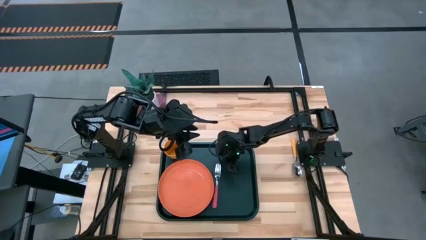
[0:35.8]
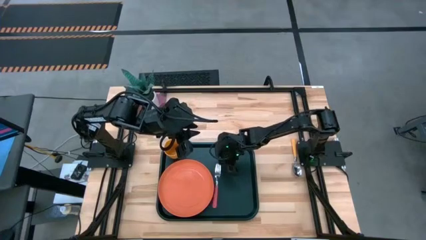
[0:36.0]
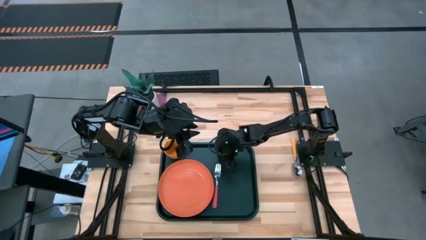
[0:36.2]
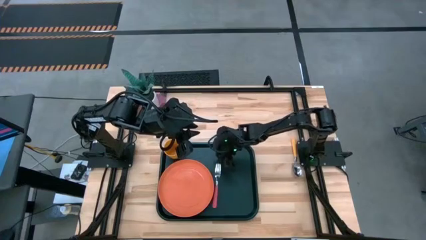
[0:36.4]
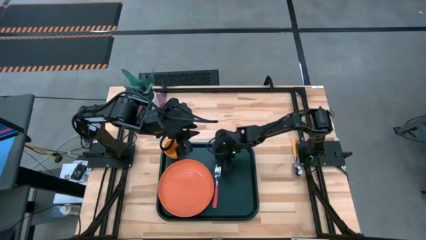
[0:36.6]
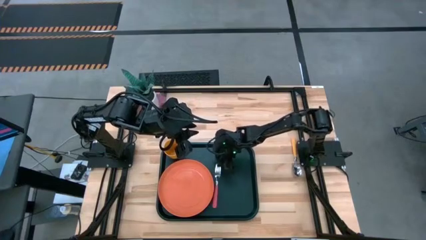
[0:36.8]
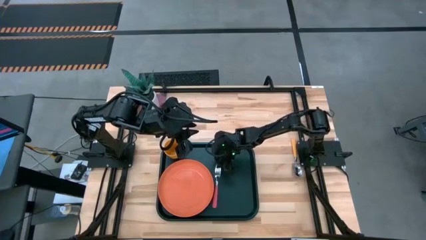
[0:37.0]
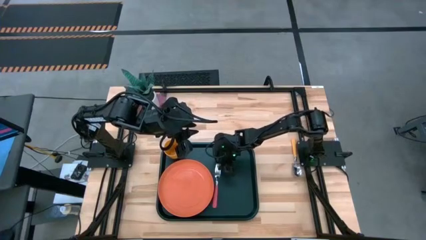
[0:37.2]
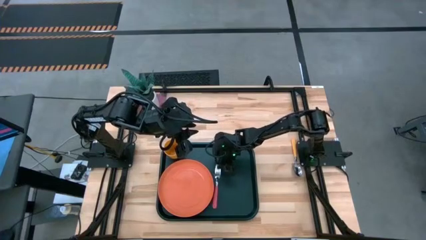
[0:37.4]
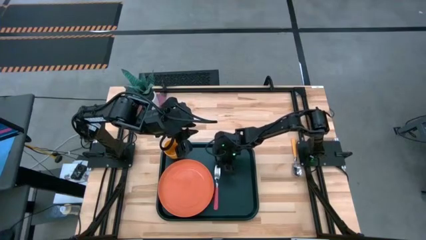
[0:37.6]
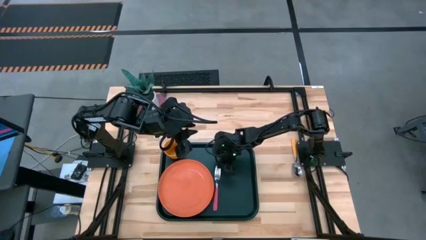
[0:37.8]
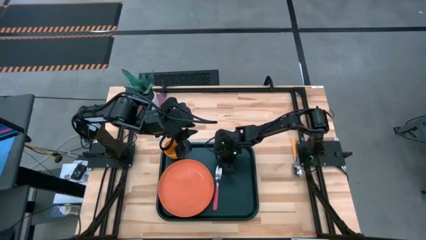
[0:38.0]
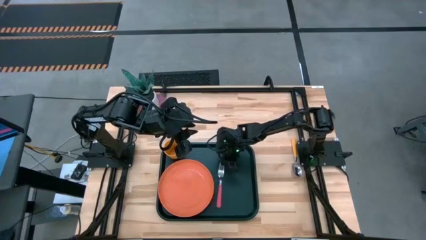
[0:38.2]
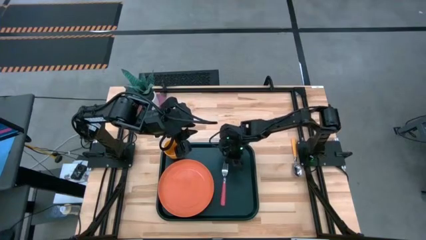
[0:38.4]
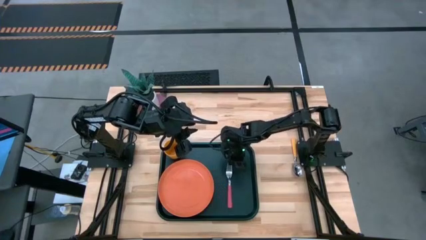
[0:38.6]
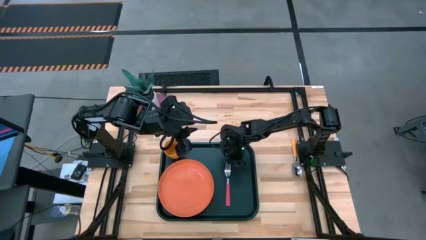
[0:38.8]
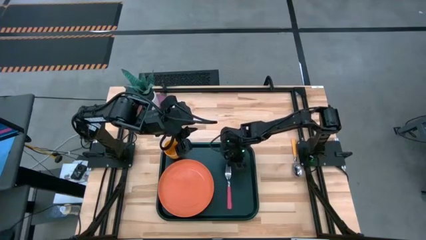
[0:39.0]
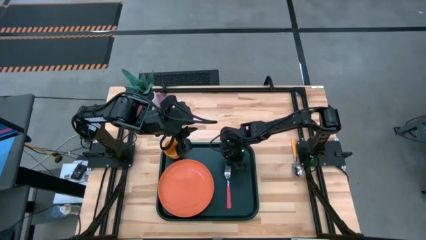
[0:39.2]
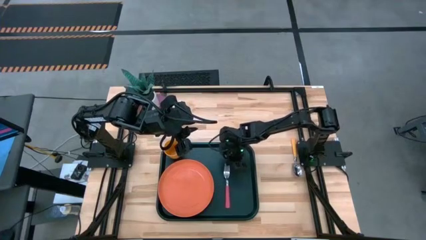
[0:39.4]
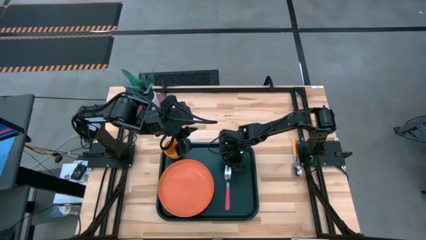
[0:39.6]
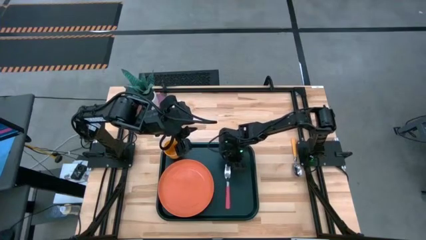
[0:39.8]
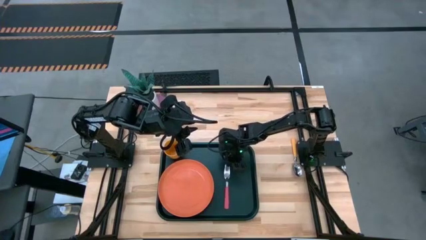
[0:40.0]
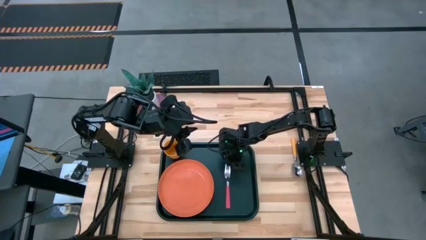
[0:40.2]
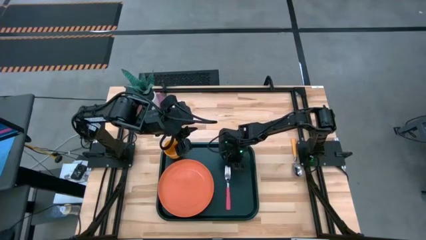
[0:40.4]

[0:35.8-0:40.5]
Task: Pick and place plate/cup/fork/spoon on tray
Put the pink fork on the black serving tray

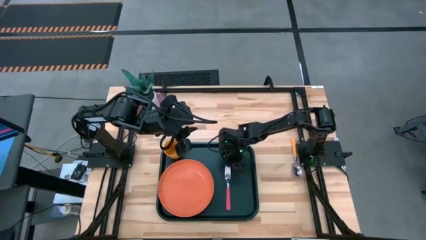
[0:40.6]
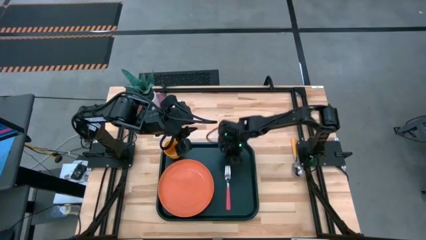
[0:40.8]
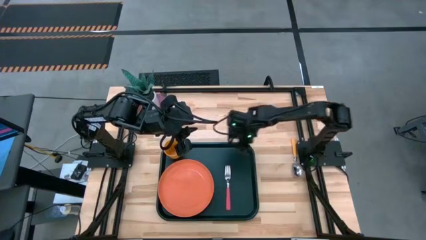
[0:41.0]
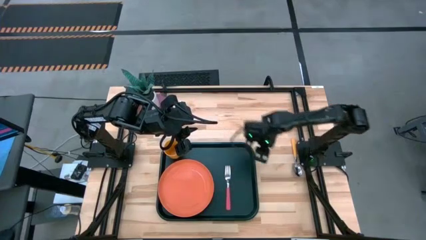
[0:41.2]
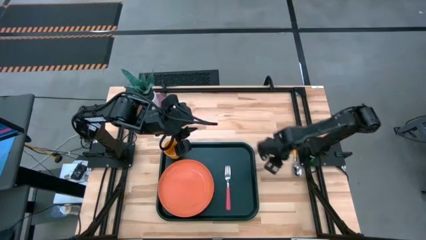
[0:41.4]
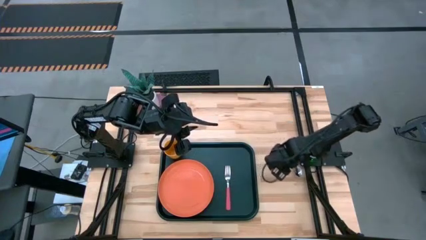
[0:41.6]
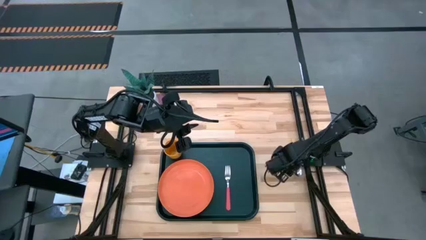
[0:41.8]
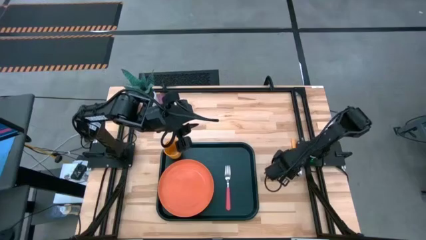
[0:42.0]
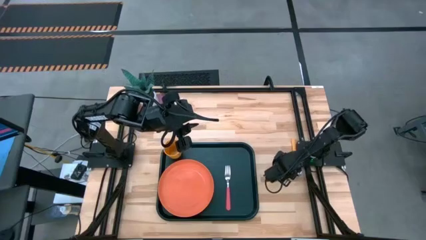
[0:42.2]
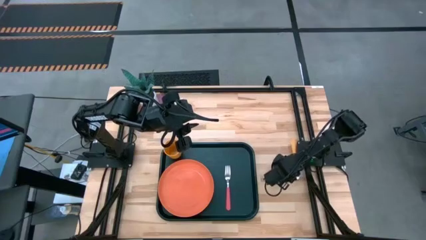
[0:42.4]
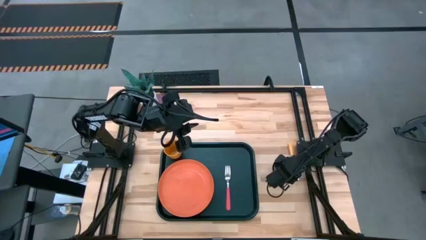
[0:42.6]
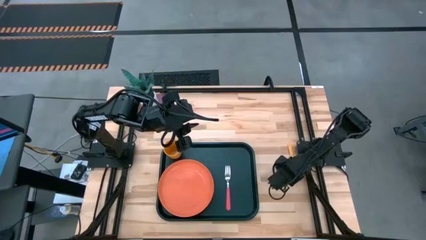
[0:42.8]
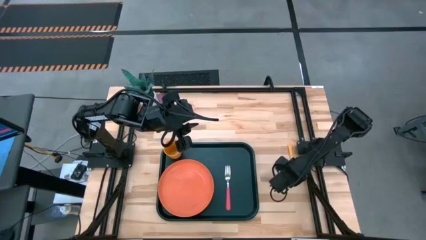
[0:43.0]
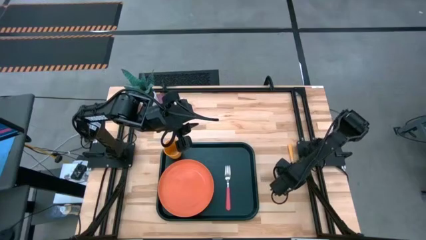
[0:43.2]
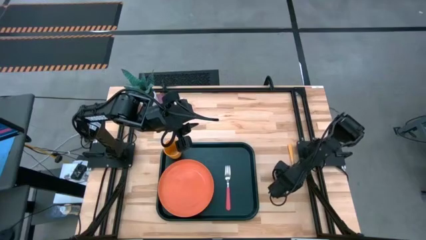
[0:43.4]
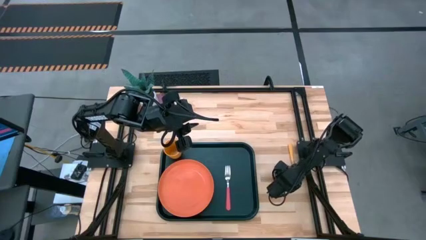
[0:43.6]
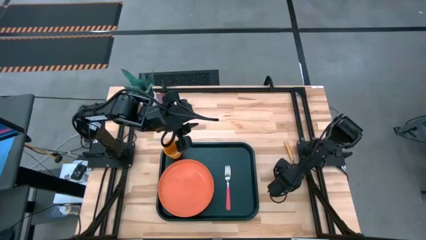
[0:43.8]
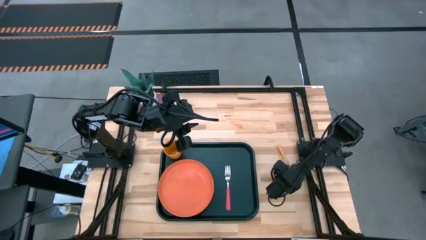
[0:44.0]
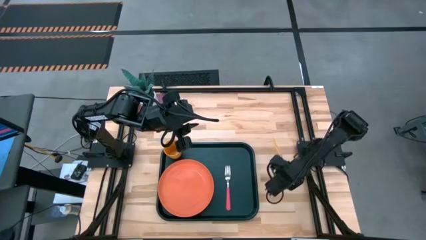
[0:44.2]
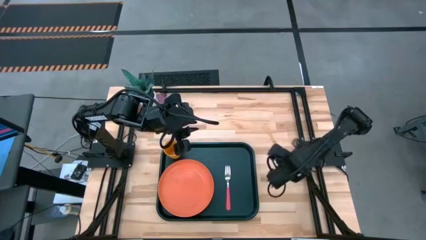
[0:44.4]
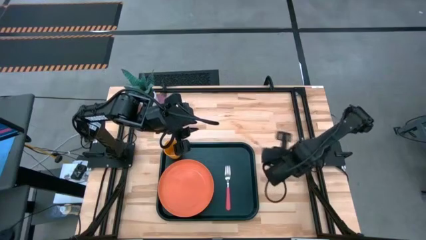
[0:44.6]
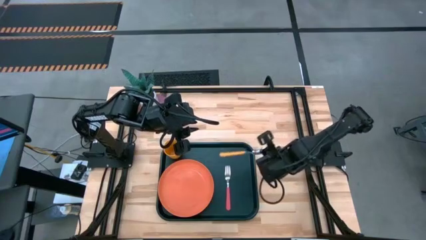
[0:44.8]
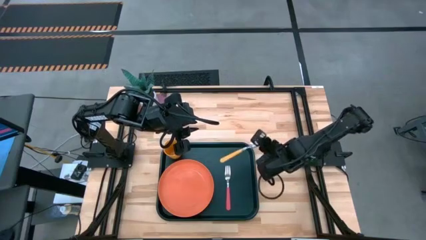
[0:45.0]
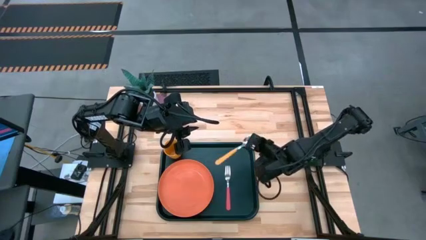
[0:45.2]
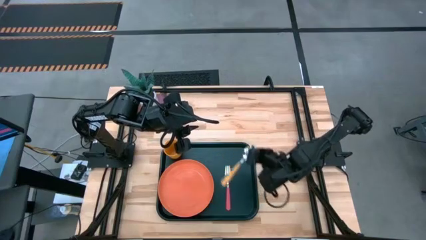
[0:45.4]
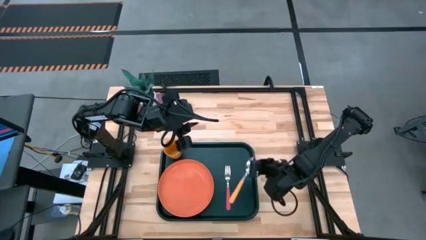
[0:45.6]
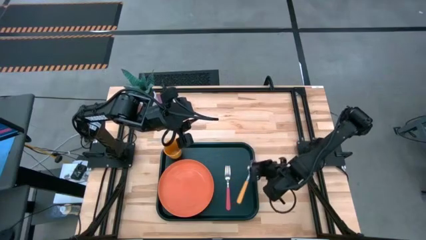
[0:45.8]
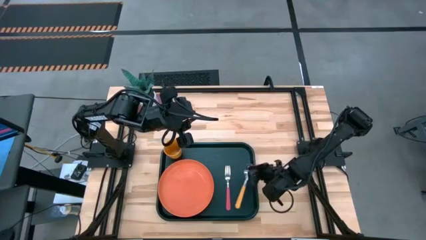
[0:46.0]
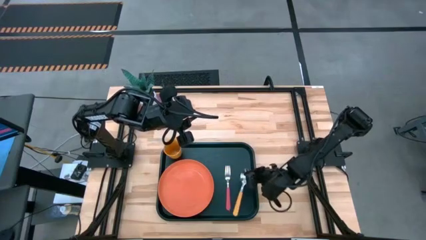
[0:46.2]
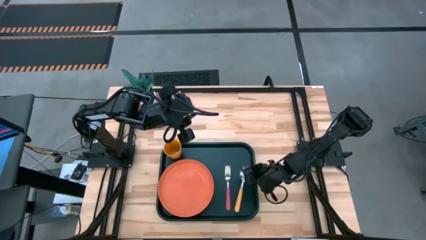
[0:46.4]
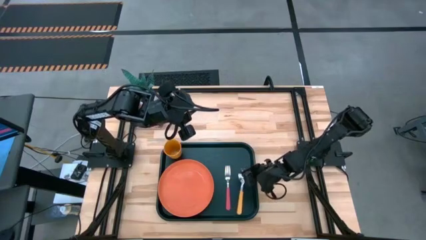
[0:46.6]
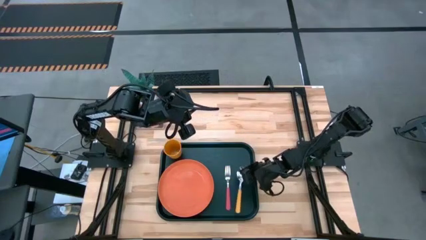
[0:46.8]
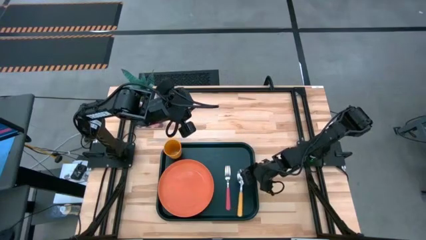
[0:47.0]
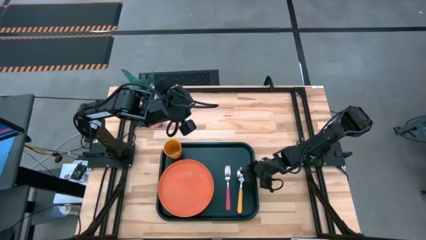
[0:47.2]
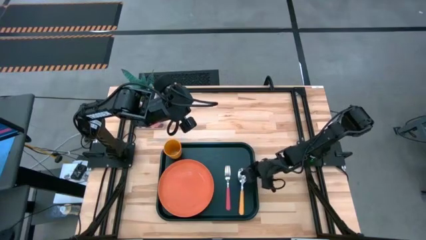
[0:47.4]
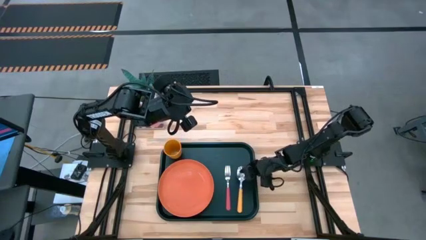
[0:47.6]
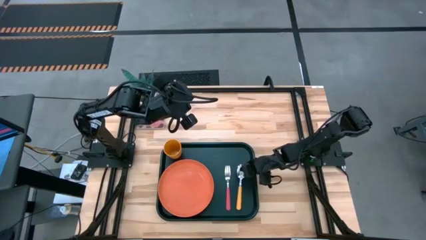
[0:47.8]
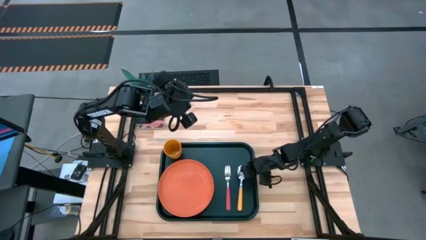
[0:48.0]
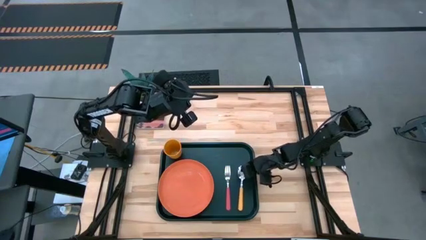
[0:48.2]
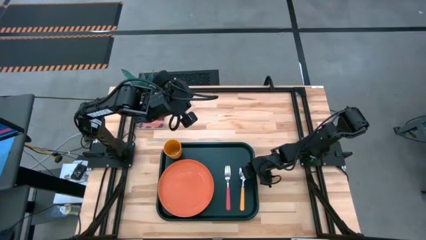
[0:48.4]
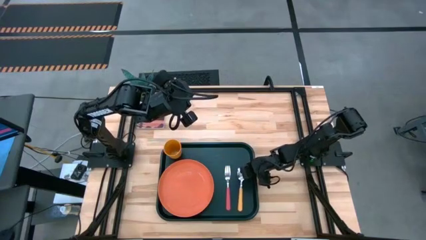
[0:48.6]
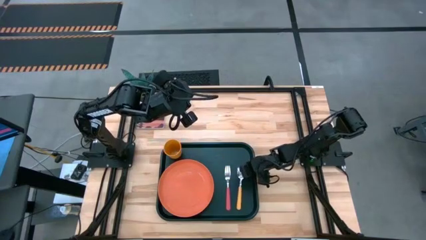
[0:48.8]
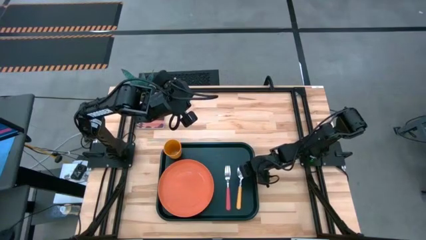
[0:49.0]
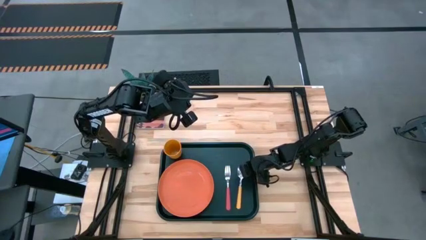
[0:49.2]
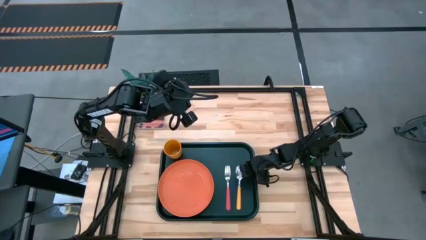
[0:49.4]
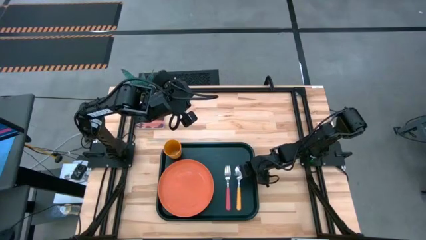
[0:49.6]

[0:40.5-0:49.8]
Put the yellow spoon on the black serving tray
